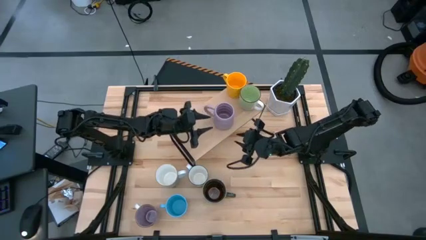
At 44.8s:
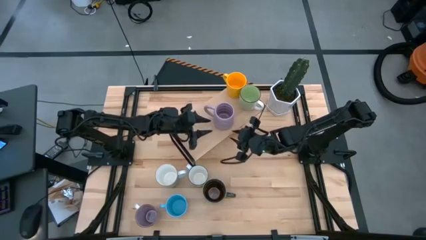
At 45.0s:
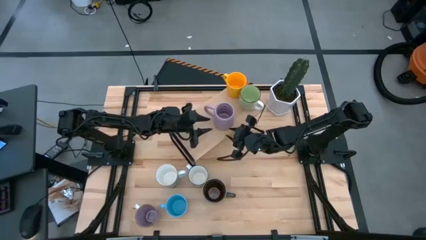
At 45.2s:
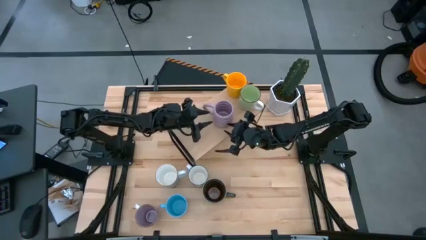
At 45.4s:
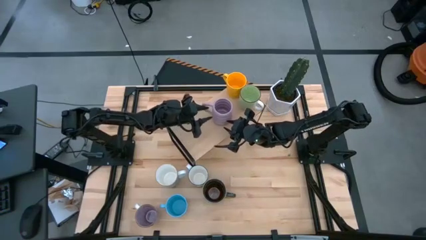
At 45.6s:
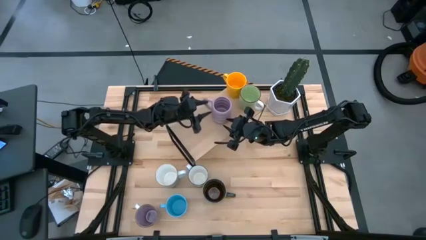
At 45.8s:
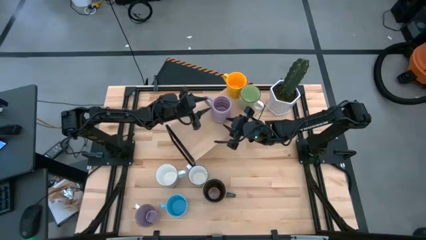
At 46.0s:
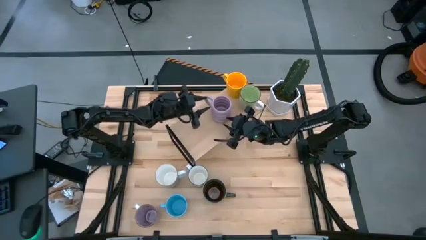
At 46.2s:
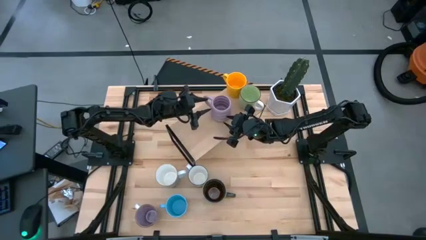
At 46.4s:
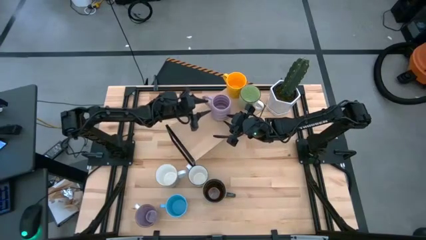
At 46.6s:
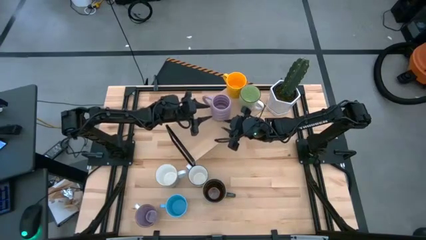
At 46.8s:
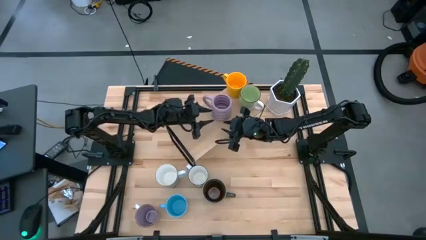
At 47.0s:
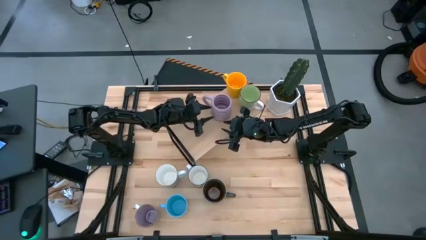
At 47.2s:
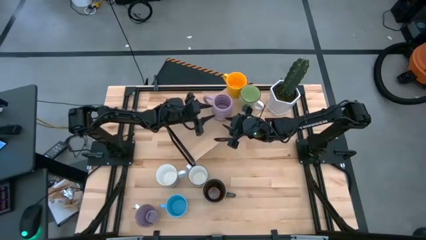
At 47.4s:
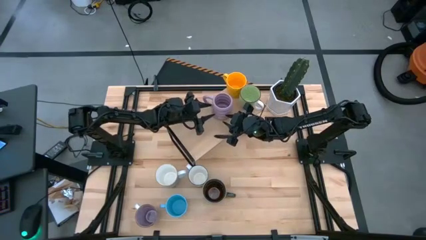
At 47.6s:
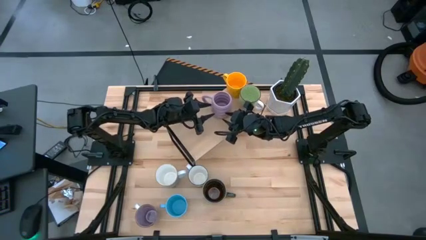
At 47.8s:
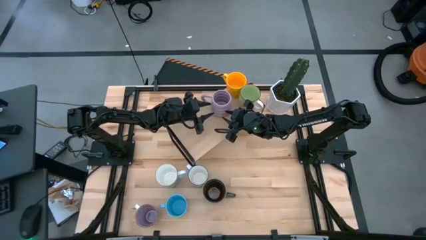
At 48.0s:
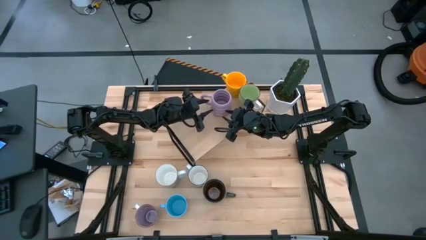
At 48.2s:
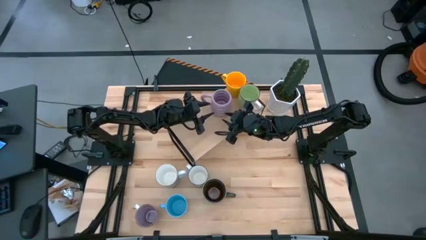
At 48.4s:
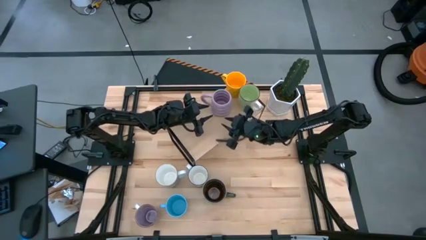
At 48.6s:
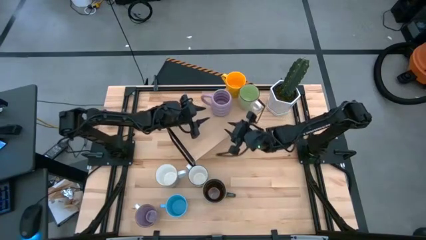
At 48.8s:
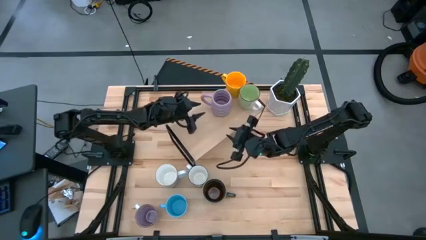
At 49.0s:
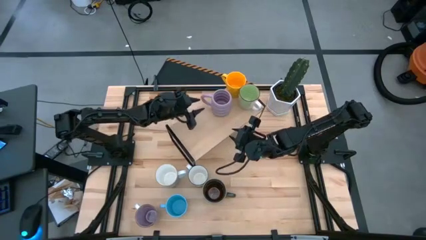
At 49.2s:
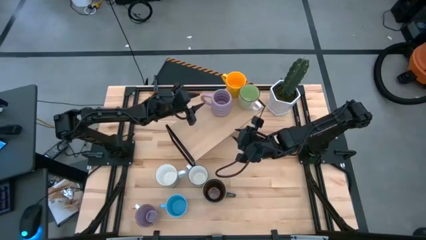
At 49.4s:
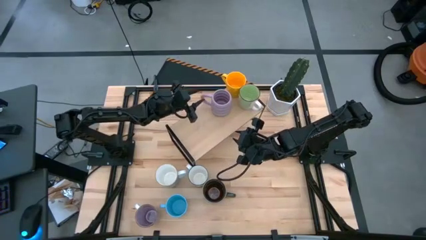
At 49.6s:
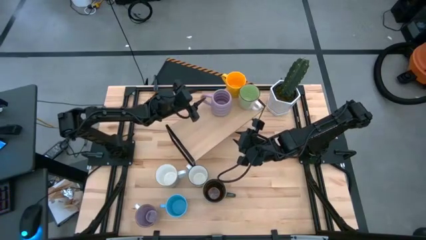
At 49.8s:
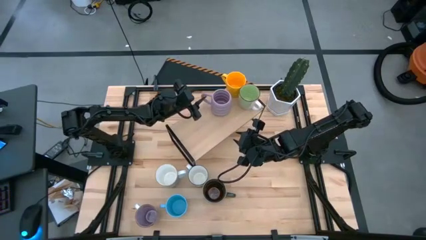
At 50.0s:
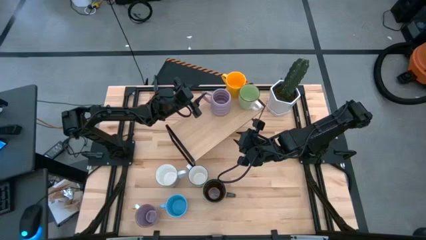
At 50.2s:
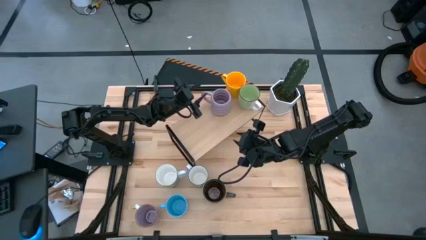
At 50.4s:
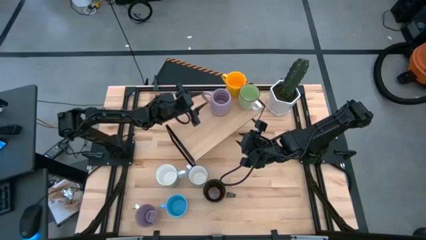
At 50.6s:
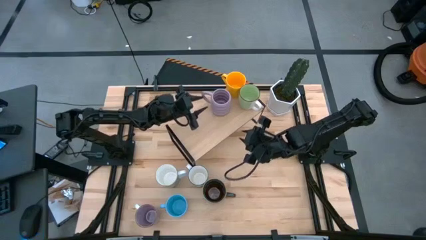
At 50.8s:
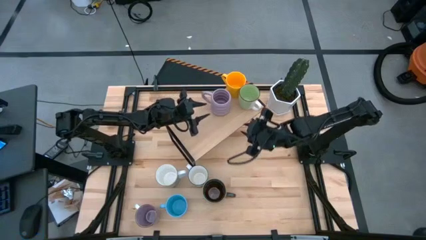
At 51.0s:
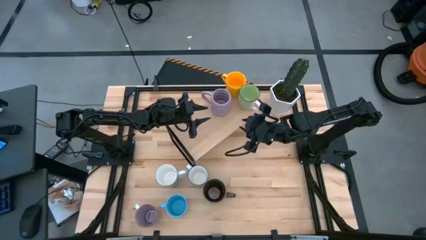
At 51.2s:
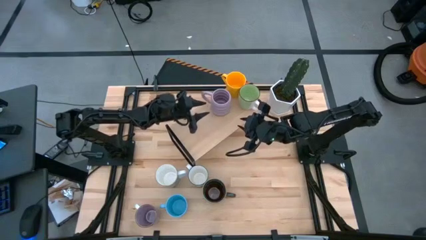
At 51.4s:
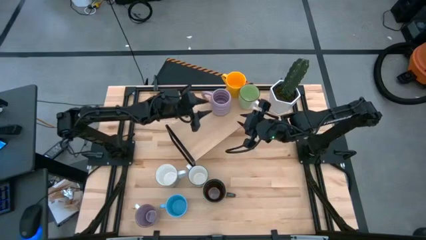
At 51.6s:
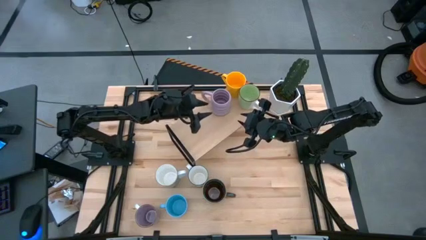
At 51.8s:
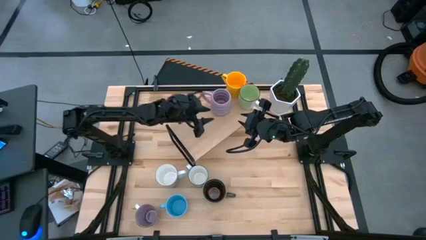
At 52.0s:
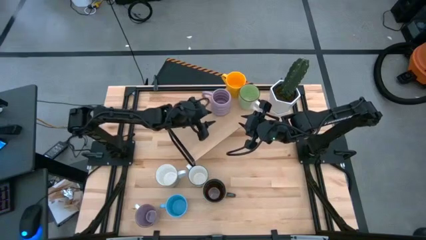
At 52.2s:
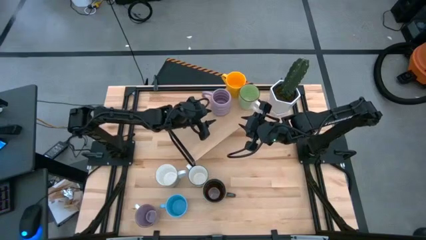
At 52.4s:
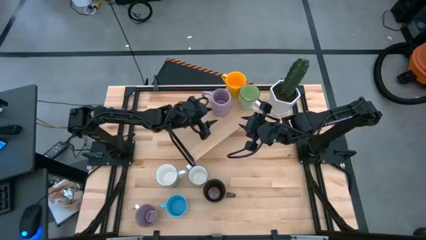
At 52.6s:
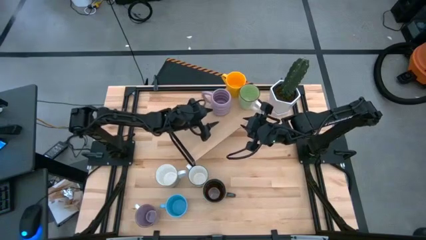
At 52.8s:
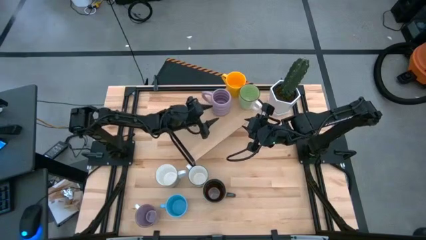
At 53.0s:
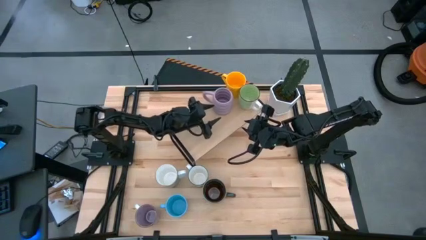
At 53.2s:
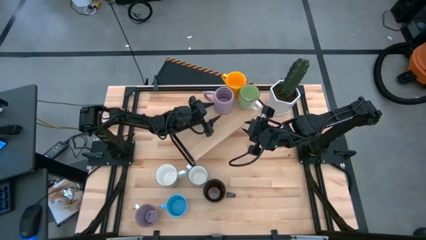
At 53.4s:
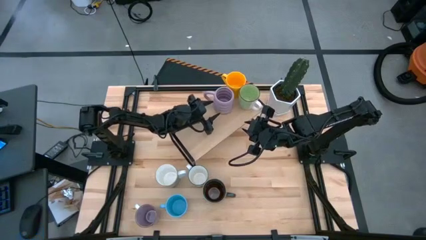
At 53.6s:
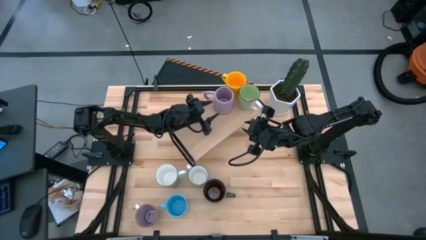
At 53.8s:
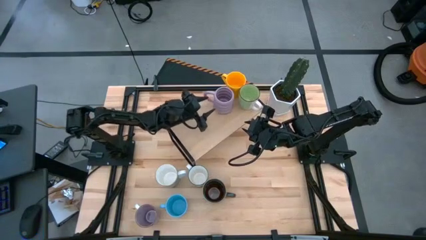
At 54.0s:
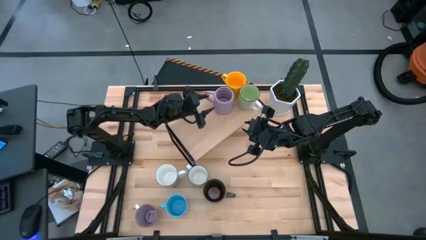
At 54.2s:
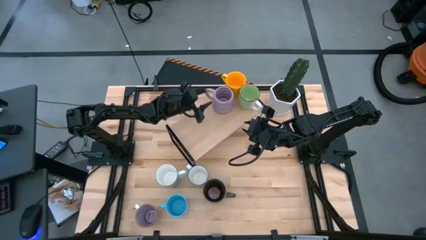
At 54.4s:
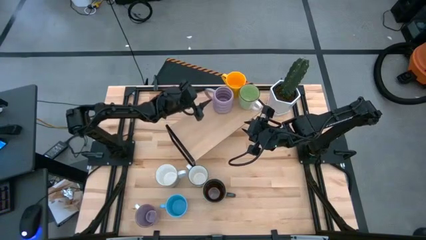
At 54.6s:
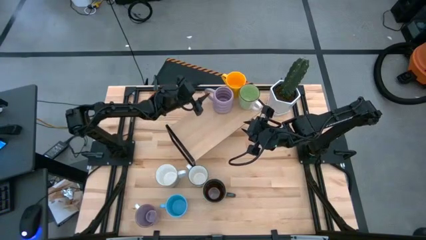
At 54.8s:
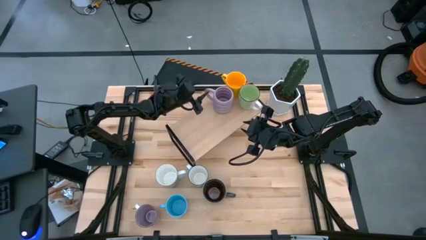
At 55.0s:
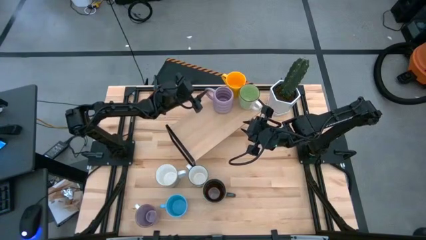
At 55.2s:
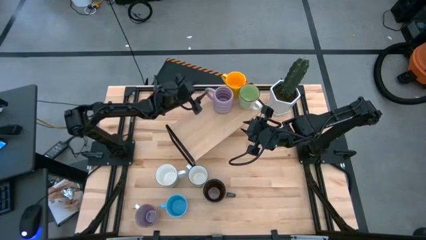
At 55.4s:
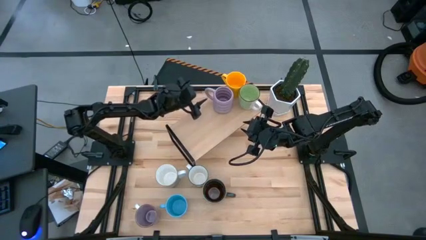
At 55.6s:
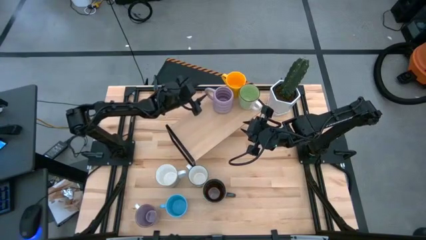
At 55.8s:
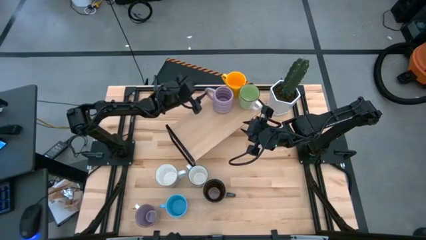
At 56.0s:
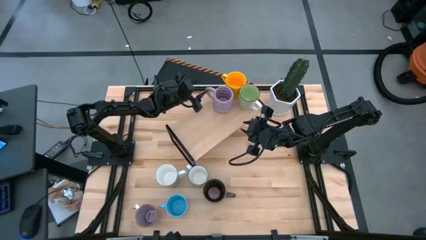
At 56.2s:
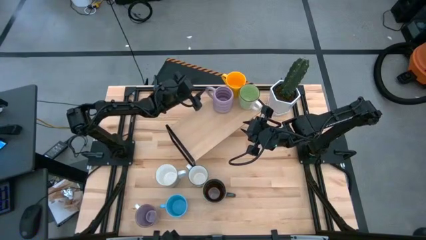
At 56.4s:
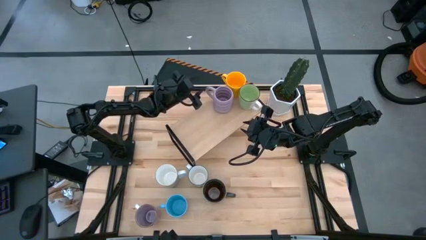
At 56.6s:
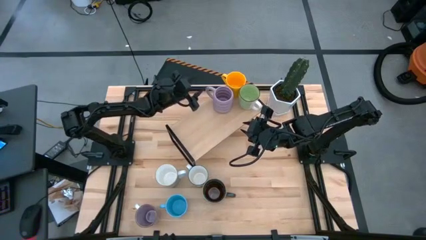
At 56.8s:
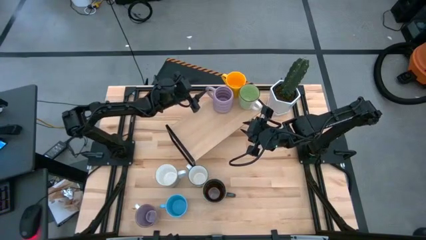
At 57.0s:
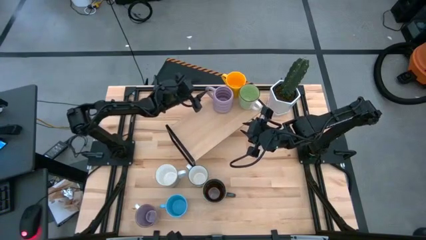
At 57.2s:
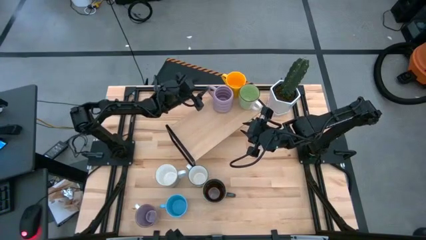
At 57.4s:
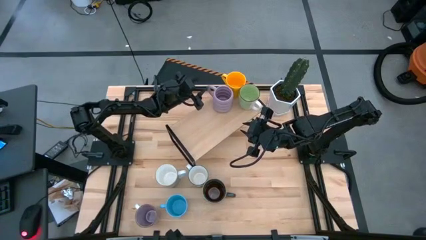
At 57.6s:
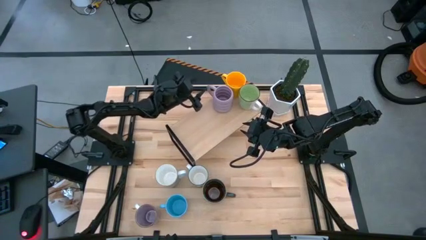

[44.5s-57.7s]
Task: Place coffee mugs
Put the right purple mug on the shelf

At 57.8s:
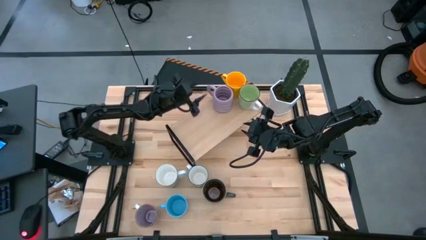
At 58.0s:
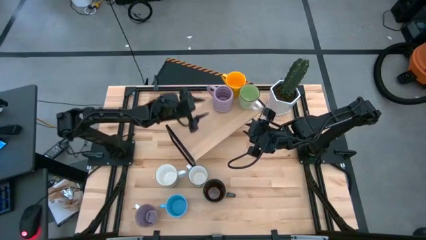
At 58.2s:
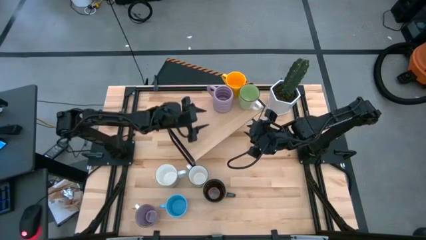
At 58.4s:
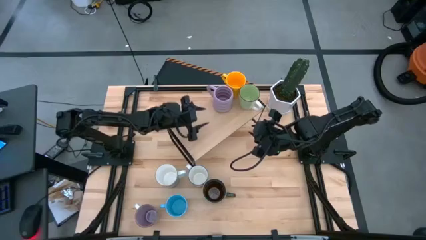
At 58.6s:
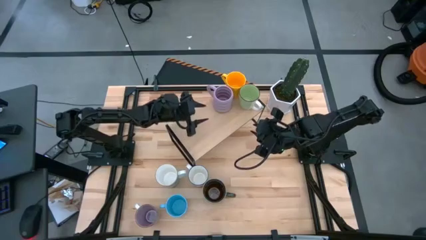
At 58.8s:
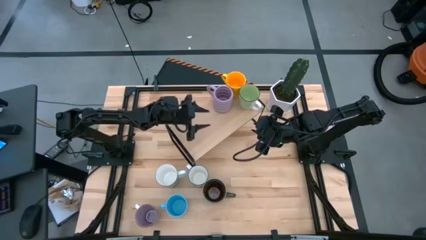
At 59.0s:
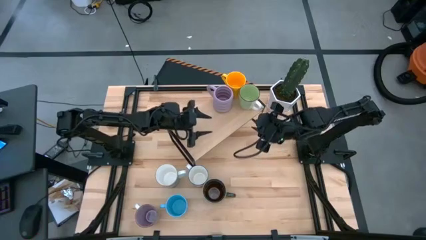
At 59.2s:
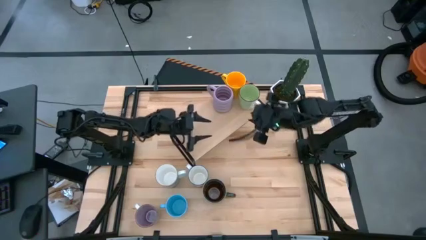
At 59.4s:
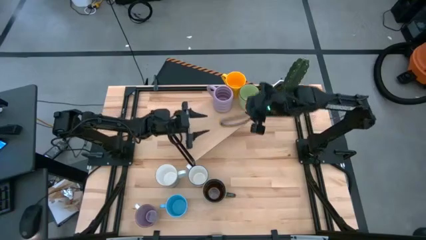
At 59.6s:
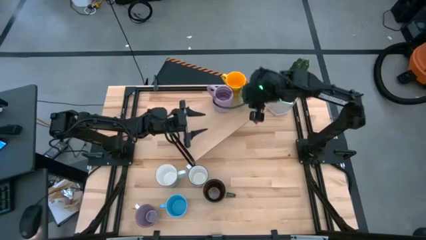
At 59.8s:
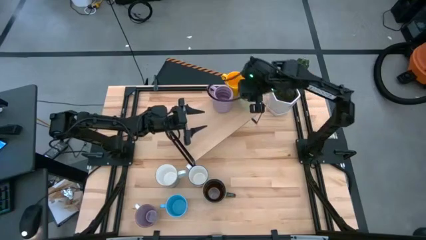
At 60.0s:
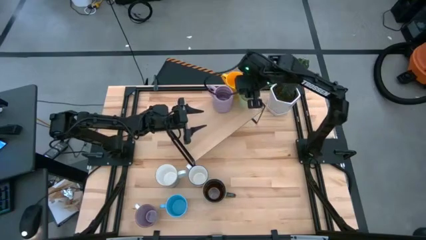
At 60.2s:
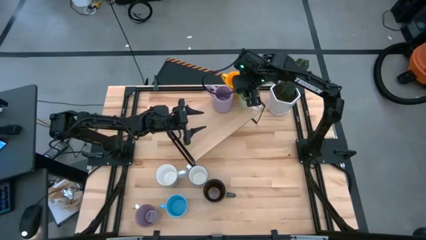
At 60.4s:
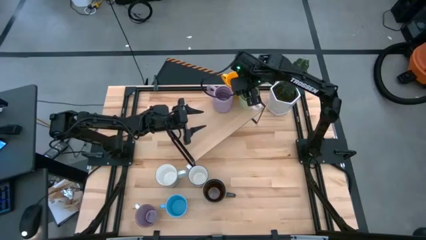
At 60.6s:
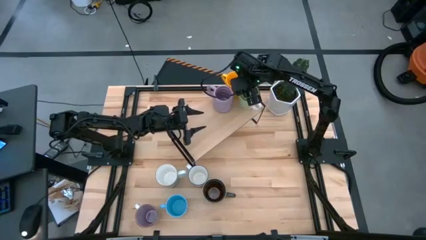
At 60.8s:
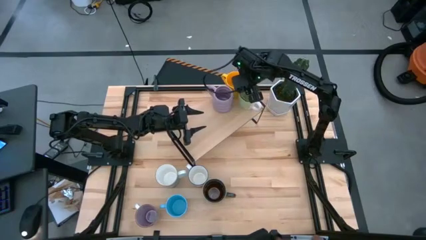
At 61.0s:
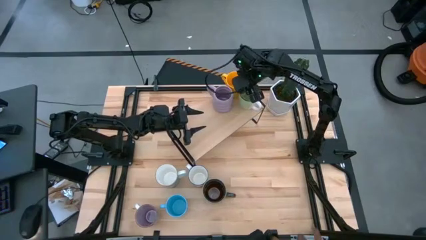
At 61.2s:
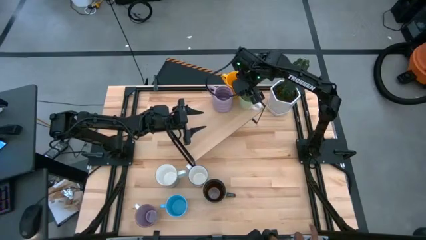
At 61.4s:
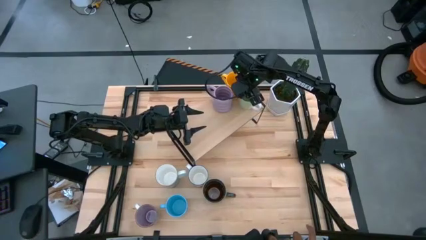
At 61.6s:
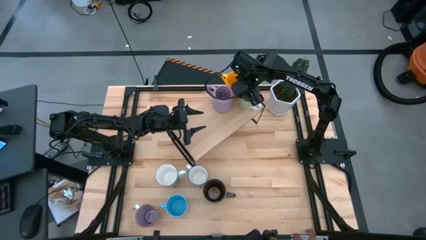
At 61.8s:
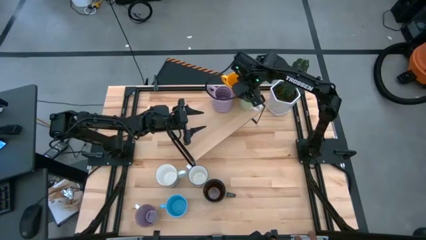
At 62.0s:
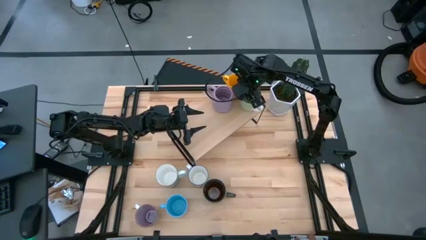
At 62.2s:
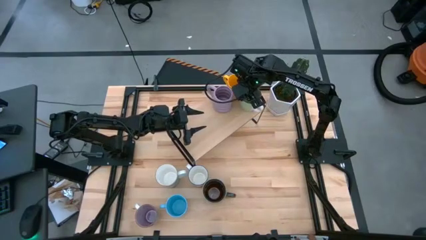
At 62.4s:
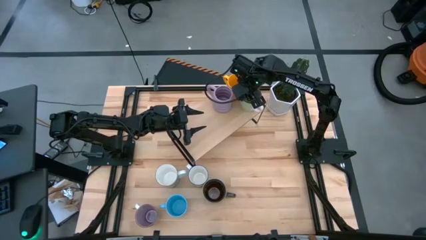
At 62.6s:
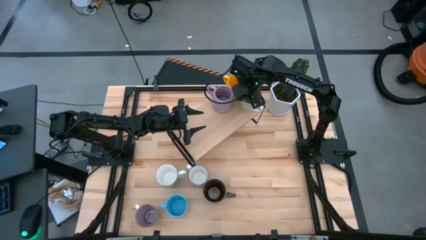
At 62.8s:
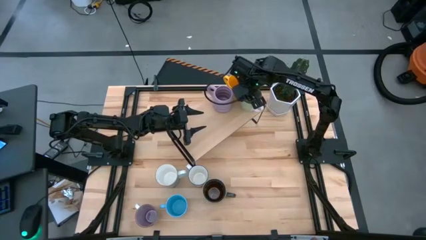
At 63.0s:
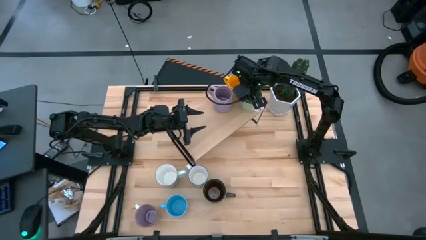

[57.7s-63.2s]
Adjust the mugs on the shelf
